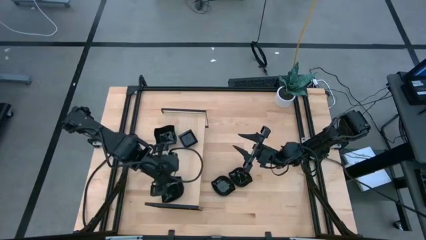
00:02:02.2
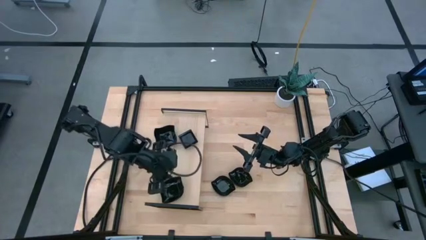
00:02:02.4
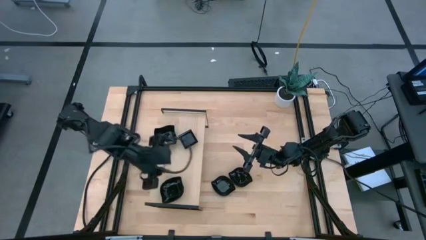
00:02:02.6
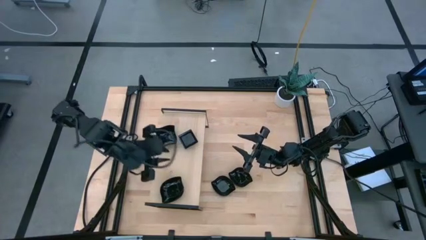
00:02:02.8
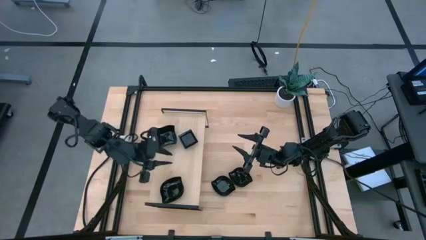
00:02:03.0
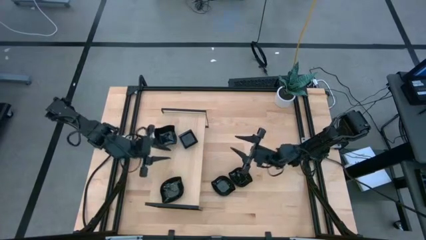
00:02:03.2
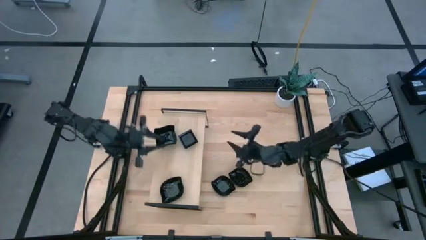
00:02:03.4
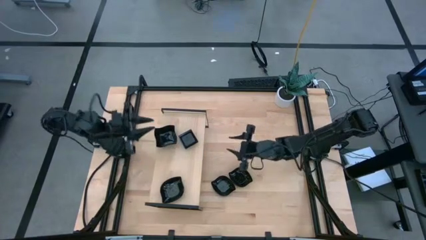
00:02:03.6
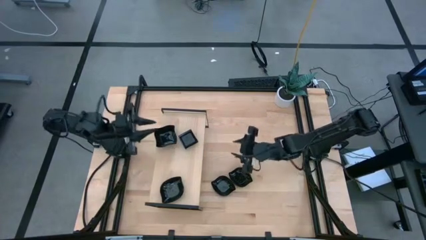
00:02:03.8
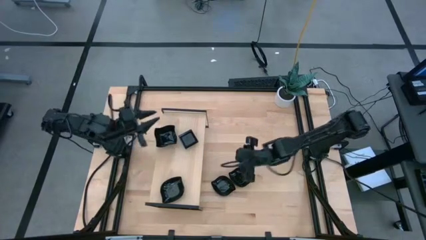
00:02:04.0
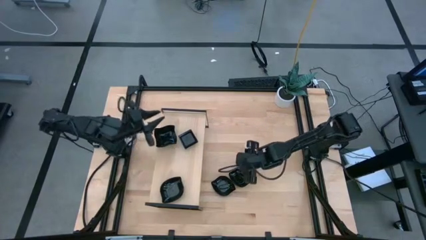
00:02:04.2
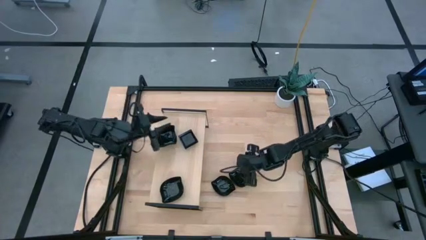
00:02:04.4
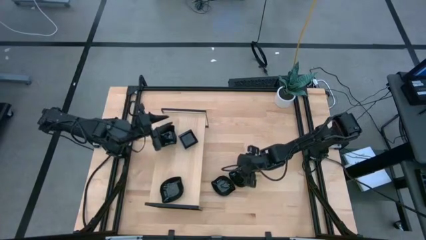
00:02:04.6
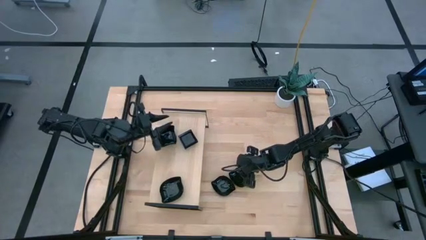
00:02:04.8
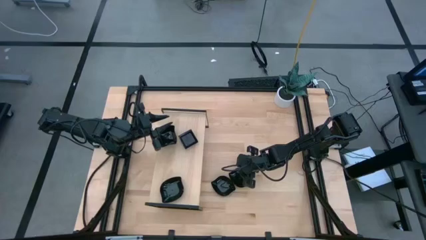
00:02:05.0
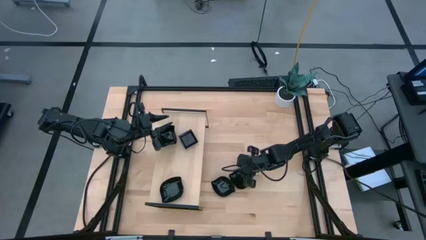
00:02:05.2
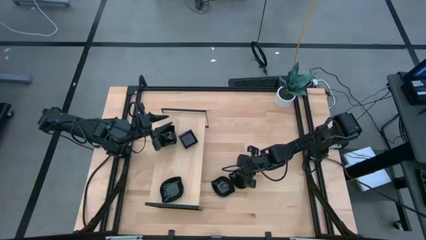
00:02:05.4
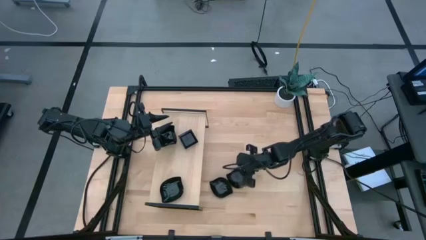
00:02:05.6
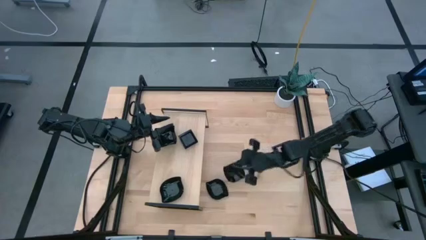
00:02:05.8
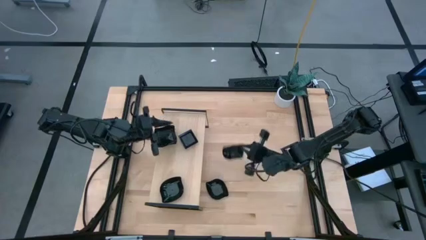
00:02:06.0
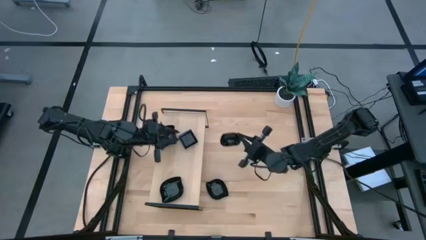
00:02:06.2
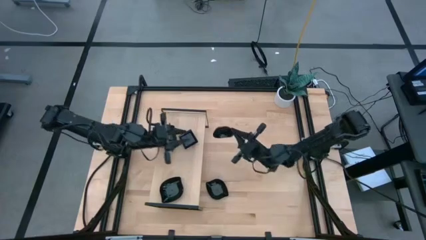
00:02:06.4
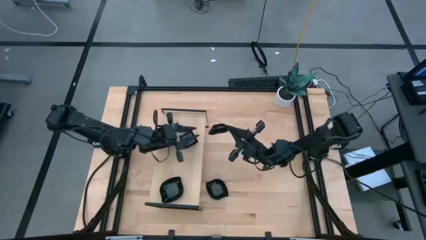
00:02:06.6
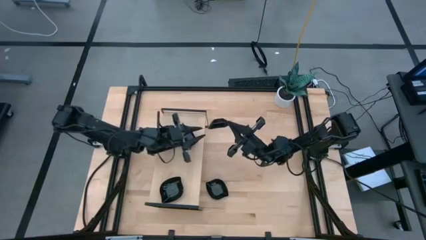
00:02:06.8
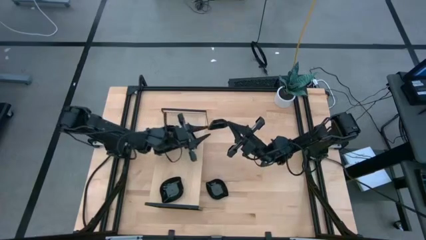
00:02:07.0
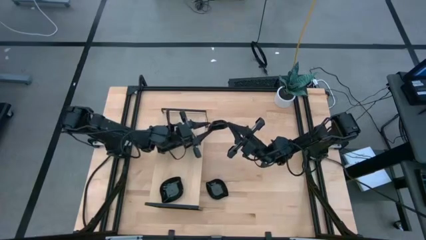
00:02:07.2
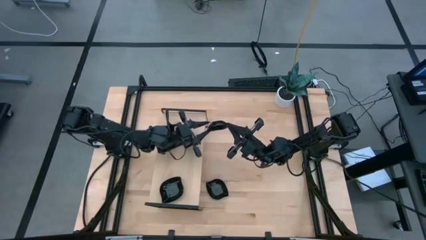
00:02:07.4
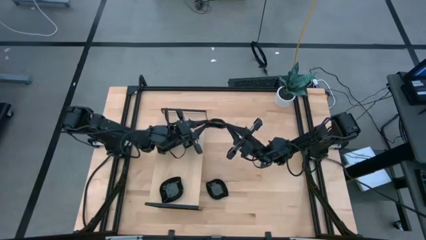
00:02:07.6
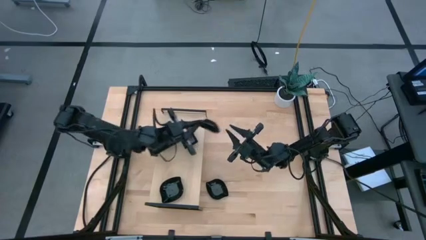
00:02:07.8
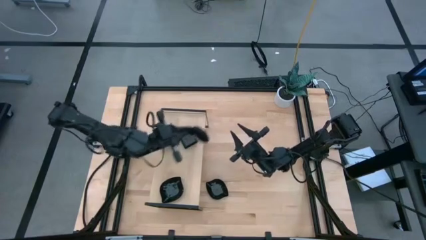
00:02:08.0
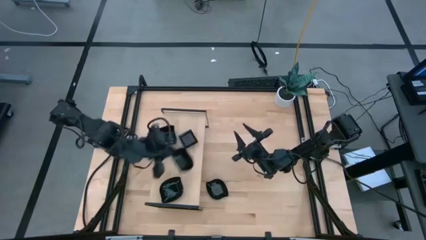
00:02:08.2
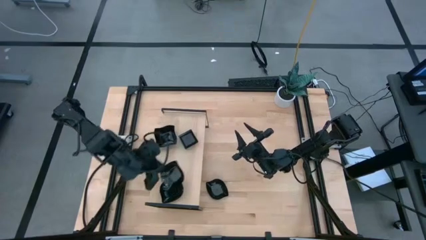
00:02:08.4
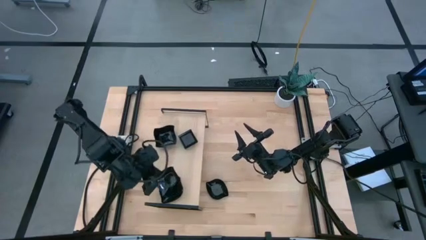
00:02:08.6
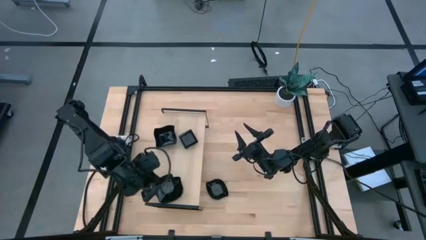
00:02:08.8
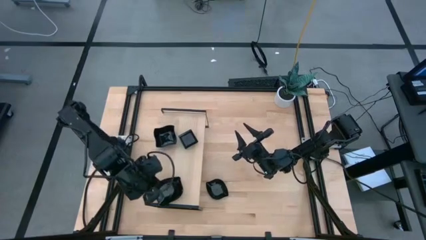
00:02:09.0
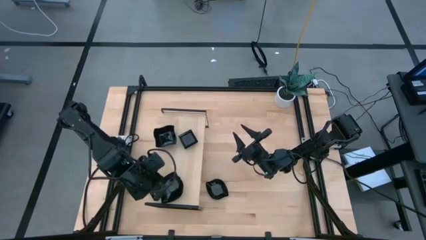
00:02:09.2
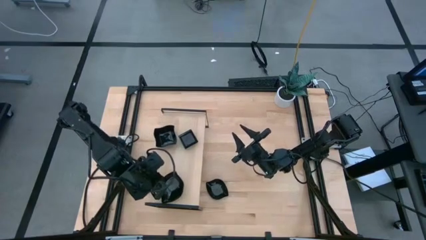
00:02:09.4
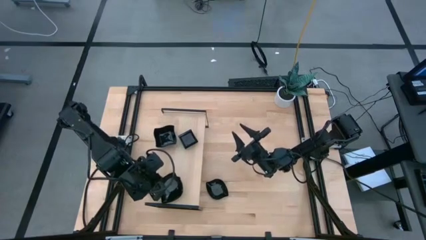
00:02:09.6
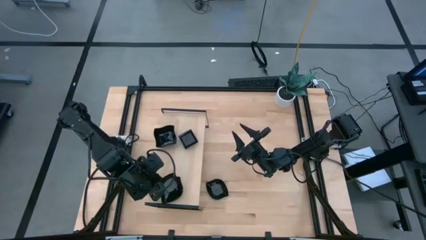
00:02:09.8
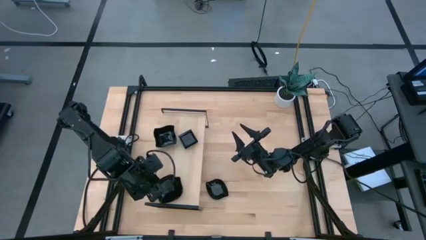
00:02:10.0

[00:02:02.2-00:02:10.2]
Task: Pick & Place Mini shaped plates
Stack the leaf shaped plate on top of the leaf shaped plate on the shelf

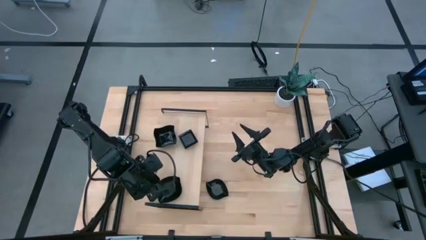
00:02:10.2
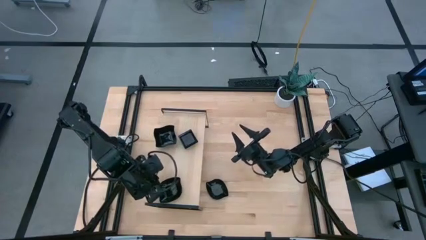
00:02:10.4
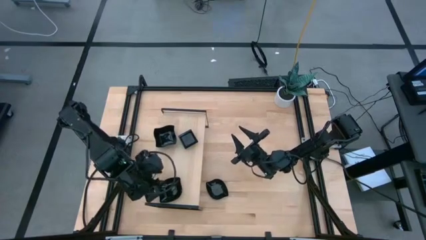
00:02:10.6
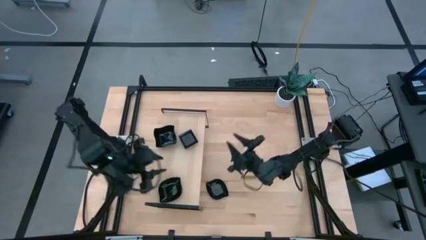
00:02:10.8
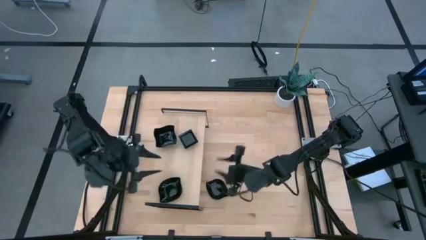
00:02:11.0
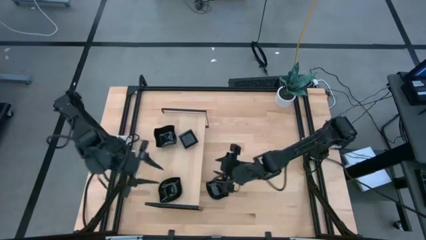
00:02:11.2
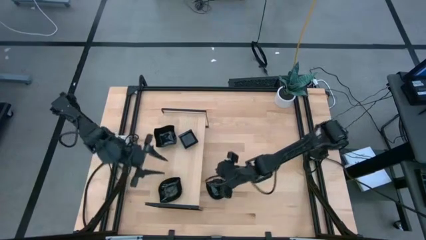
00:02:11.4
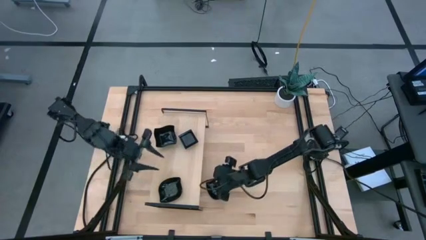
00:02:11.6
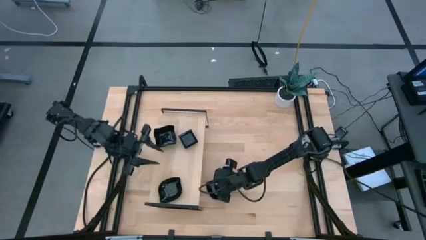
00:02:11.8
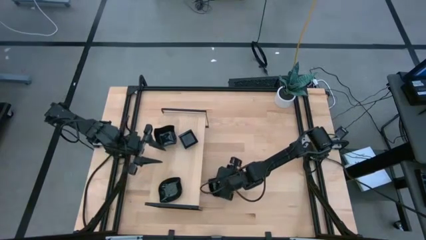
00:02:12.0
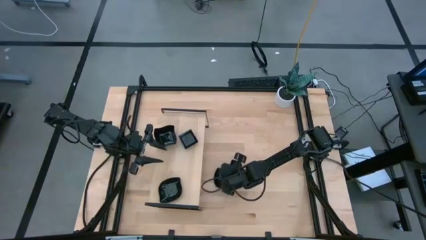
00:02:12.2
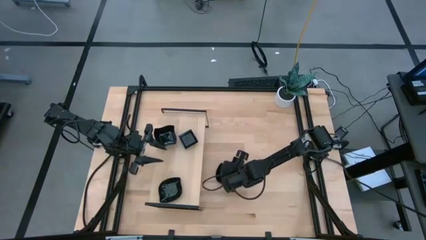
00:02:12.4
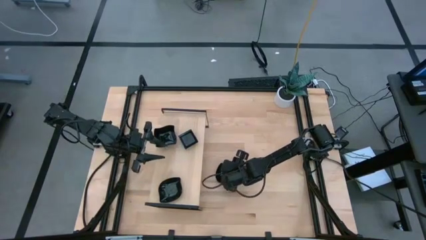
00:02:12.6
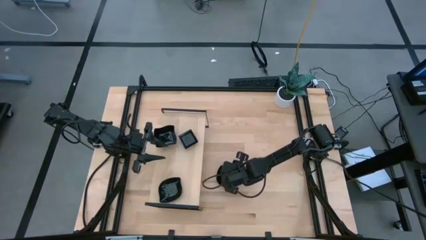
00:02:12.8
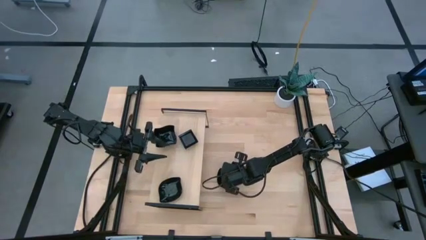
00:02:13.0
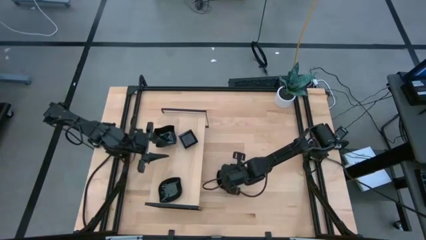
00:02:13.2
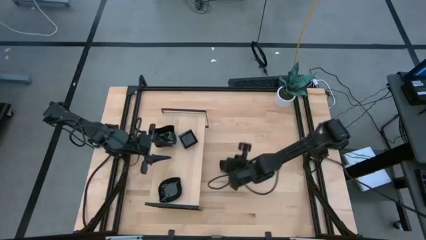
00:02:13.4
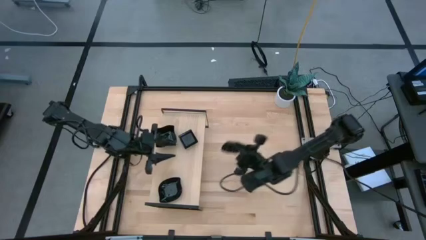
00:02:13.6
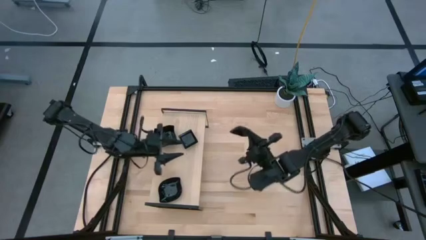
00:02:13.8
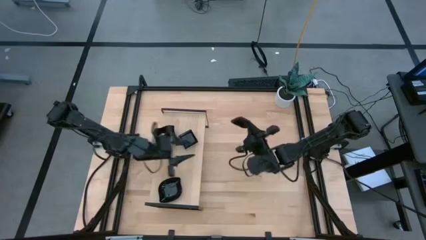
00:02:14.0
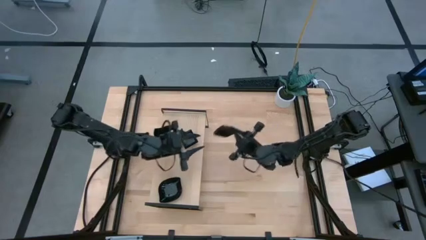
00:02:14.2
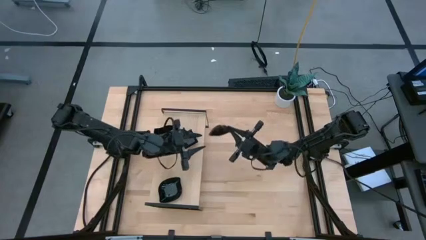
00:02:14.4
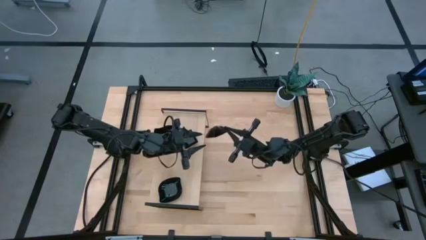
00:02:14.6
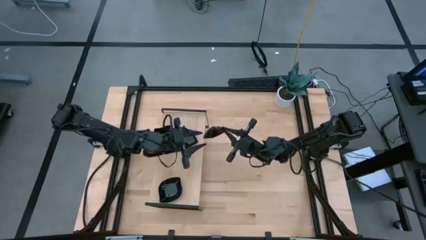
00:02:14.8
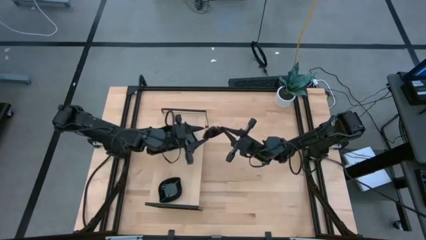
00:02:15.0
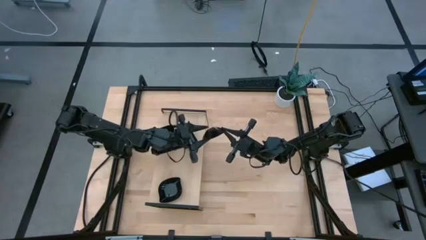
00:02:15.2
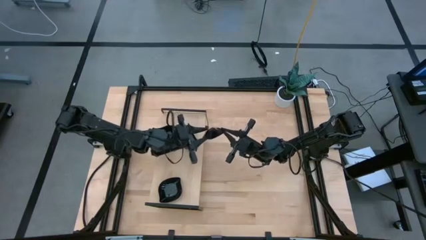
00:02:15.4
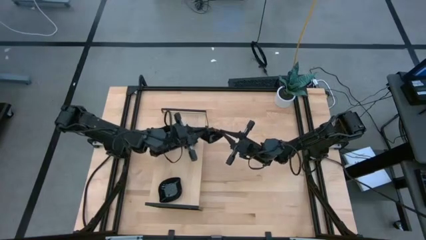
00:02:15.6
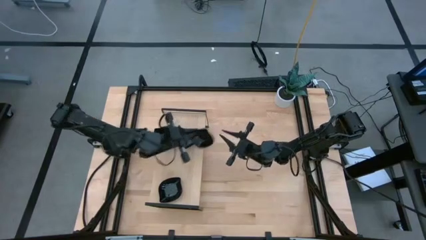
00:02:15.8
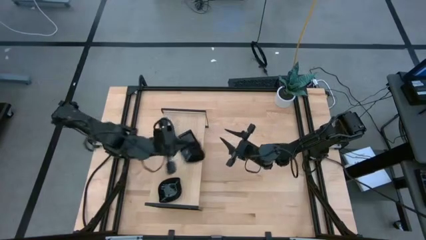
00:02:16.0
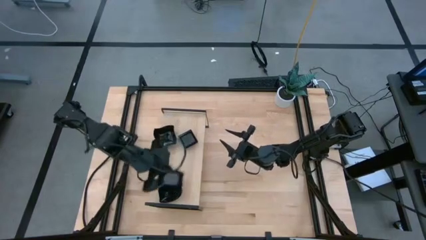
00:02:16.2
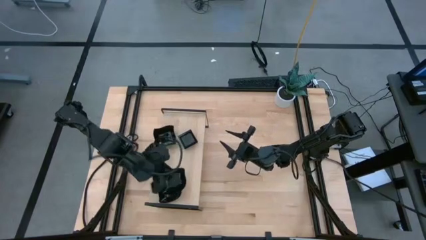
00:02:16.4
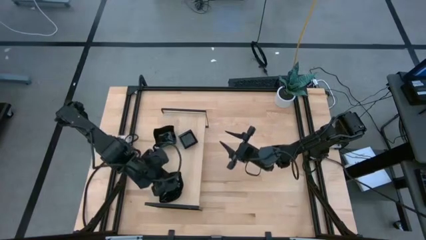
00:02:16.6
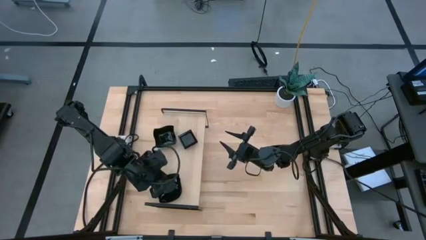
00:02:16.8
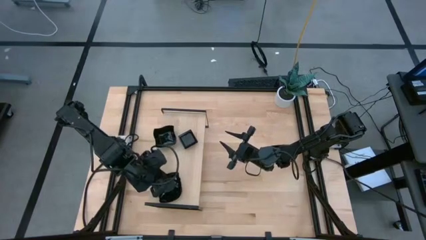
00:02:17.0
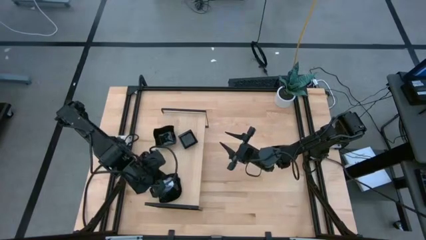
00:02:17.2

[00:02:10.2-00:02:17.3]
Stack the leaf shaped plate on top of the leaf shaped plate on the shelf
